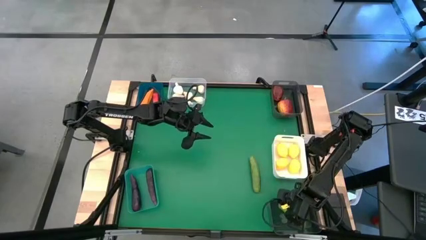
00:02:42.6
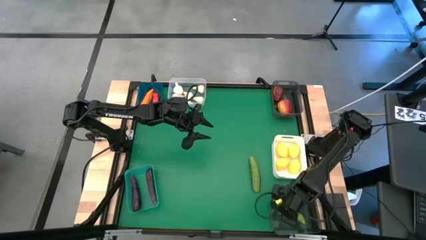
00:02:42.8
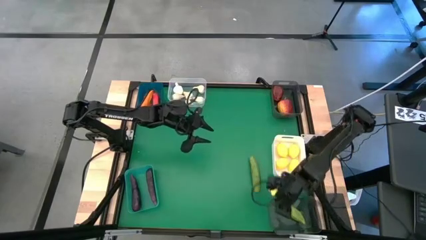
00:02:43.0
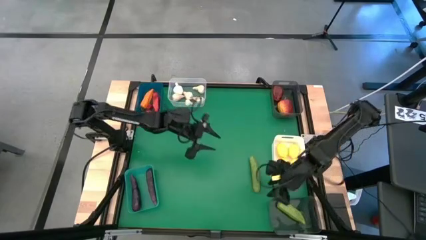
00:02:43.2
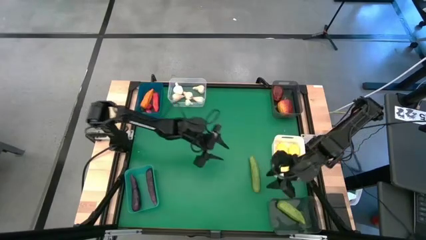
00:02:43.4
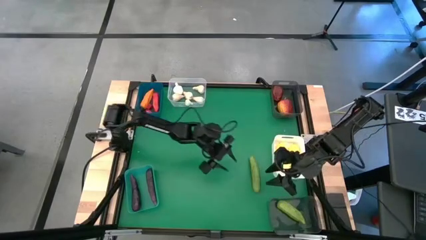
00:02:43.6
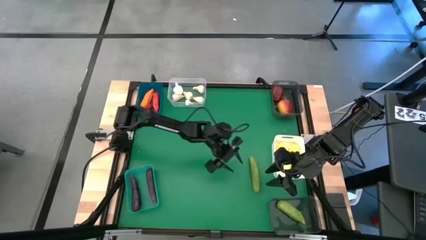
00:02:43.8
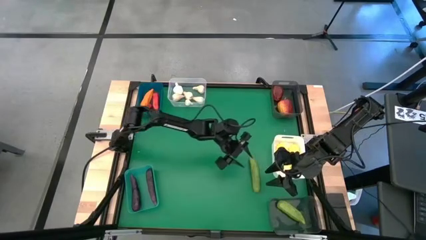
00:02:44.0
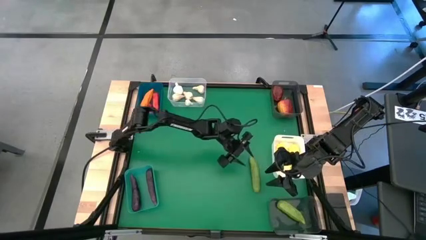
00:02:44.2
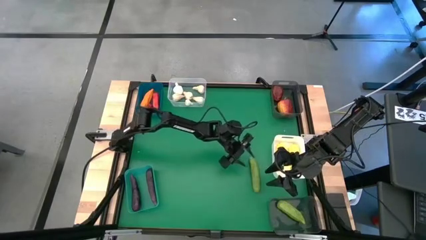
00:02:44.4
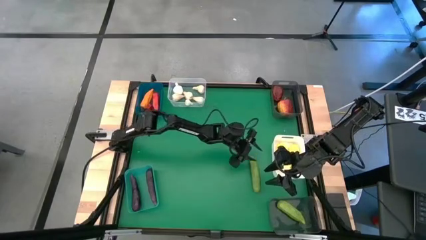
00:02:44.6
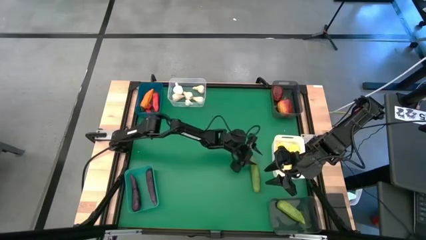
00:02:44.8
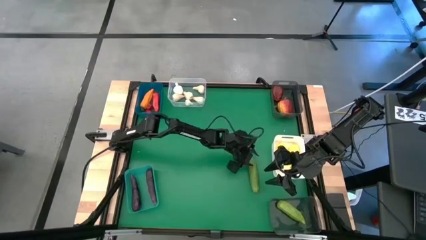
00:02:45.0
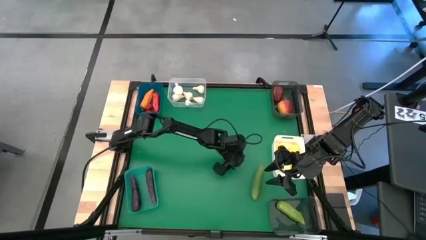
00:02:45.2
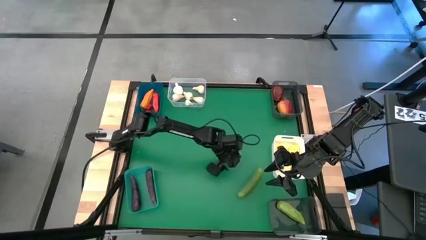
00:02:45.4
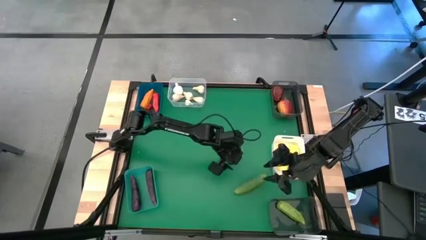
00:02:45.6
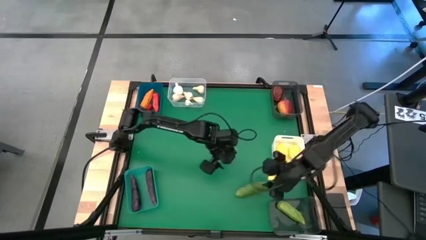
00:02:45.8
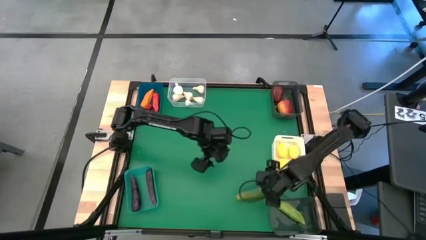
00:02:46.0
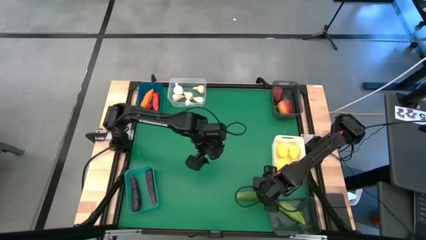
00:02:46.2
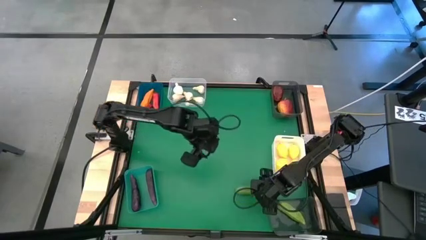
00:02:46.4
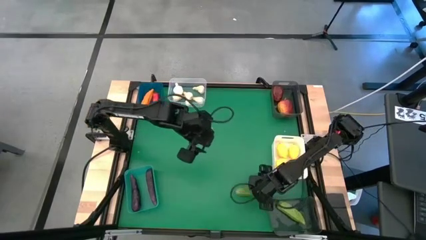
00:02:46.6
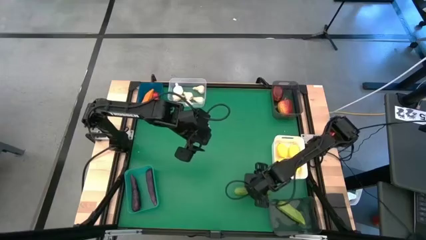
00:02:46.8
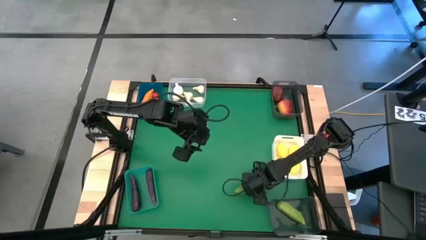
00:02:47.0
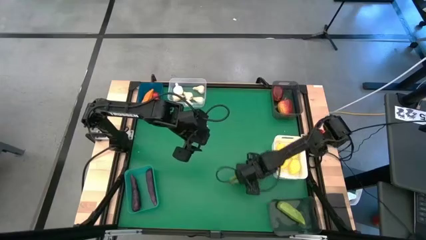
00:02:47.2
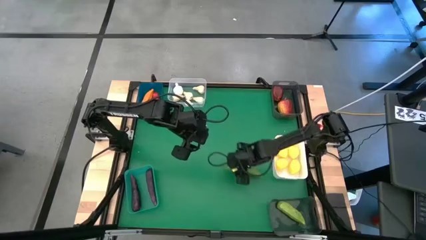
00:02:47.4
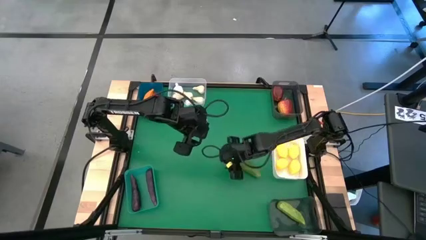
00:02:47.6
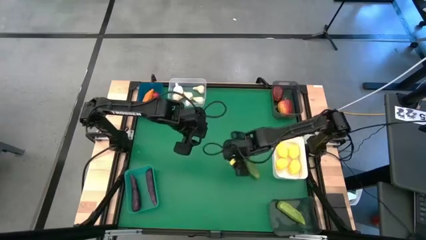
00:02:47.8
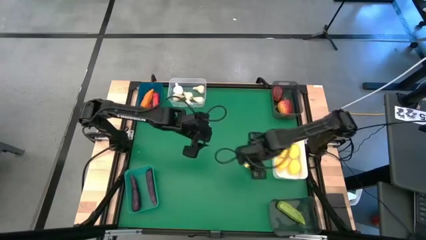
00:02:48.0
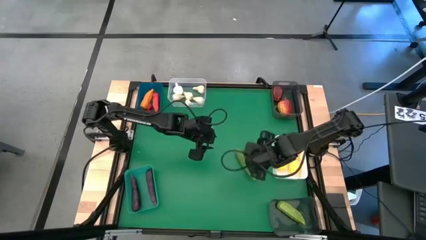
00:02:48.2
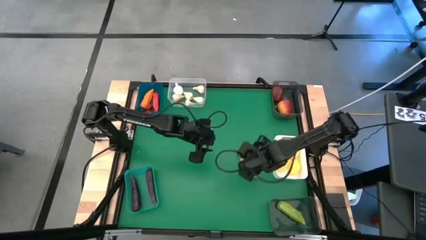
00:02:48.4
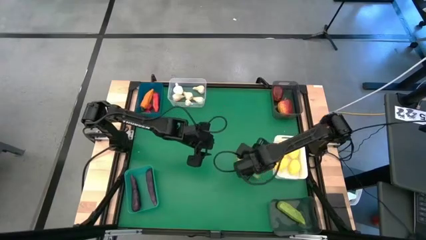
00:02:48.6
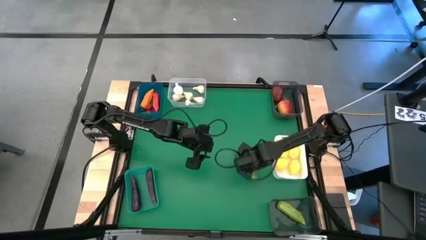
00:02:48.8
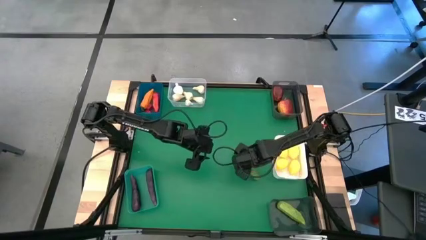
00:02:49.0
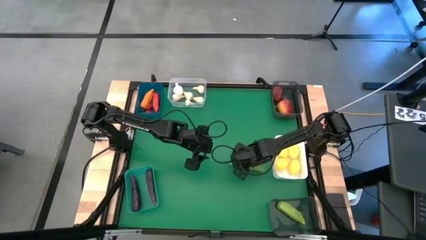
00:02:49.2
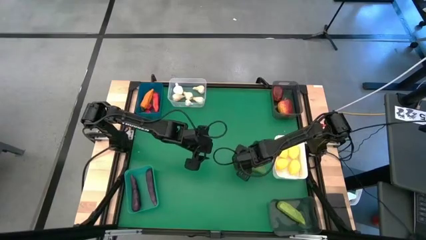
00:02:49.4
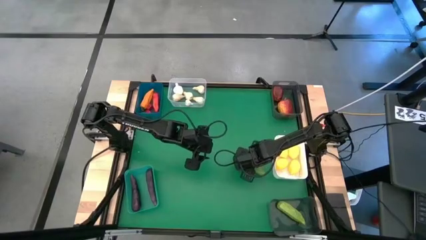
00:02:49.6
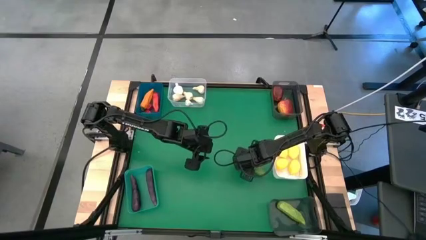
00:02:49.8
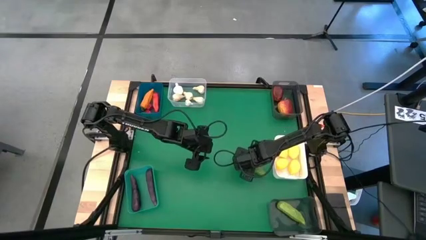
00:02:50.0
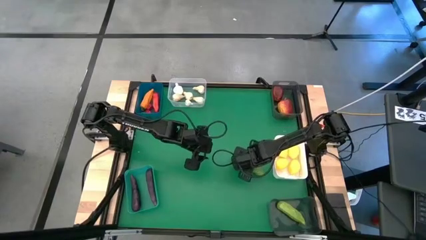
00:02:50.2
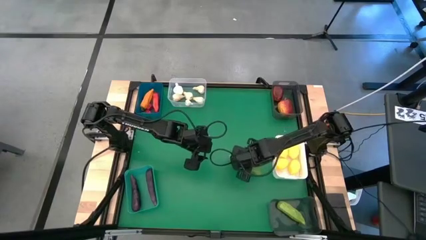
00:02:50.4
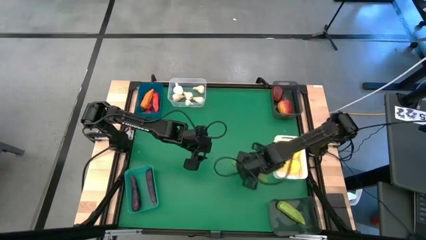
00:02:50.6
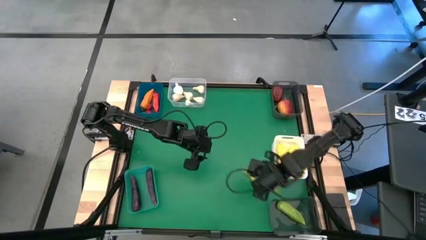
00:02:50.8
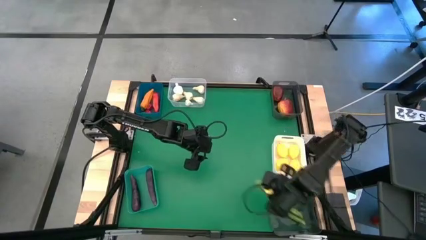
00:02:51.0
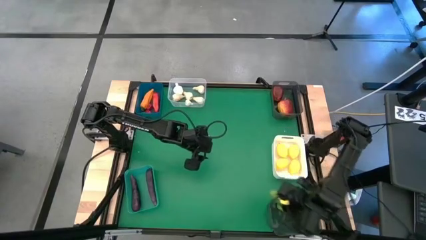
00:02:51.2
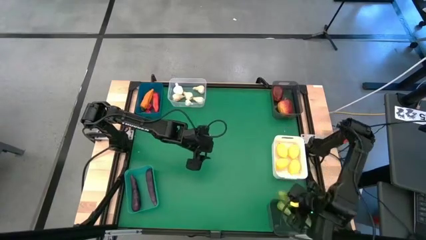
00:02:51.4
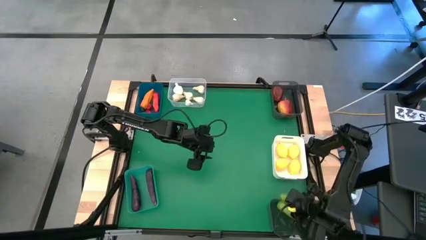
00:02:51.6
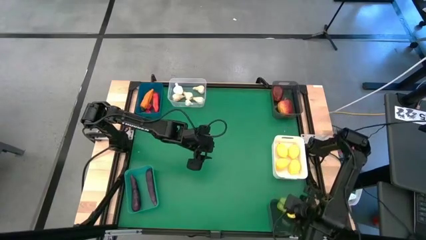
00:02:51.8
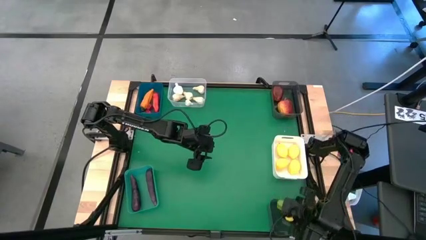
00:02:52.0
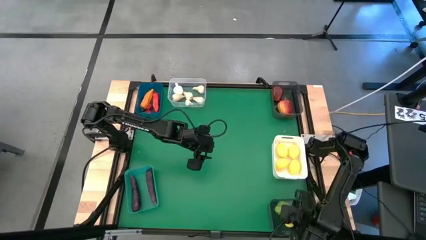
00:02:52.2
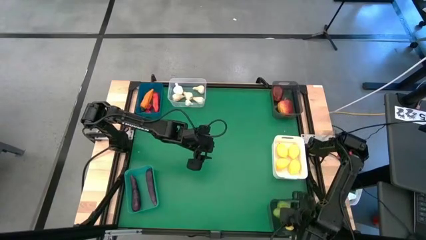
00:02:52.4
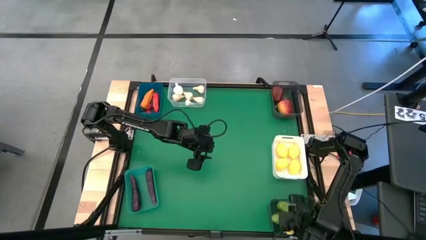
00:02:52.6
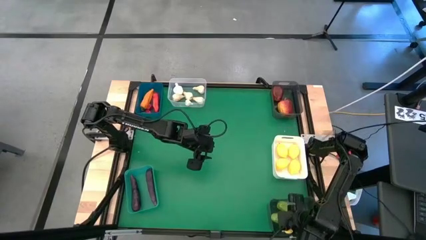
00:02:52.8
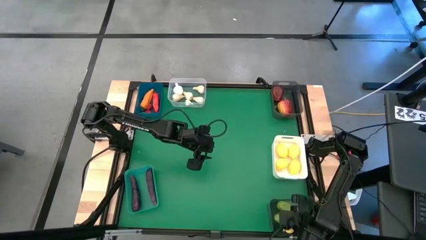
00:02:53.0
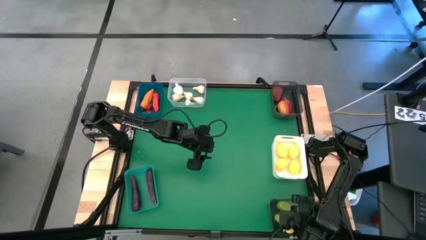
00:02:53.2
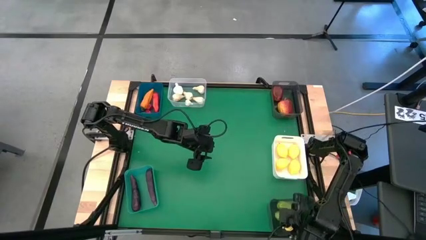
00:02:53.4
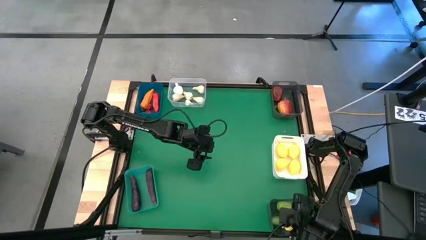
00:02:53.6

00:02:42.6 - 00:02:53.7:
Task: Sort produce into baskets
Put the green cucumber into the bottom black bin

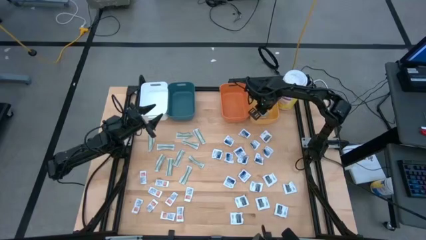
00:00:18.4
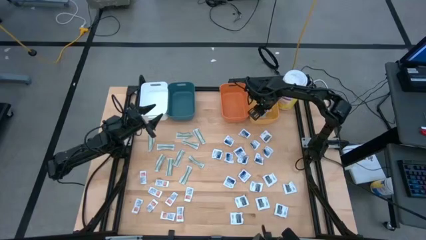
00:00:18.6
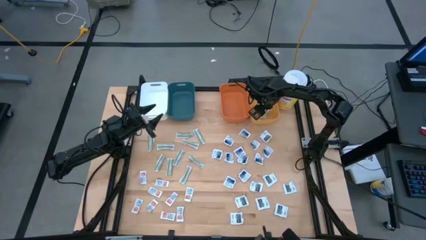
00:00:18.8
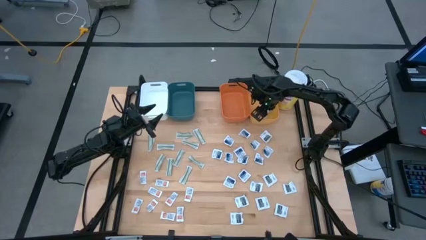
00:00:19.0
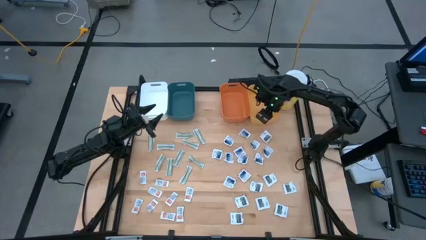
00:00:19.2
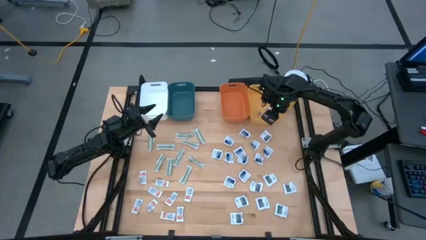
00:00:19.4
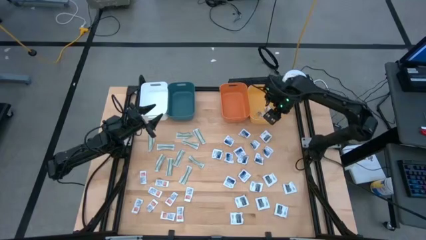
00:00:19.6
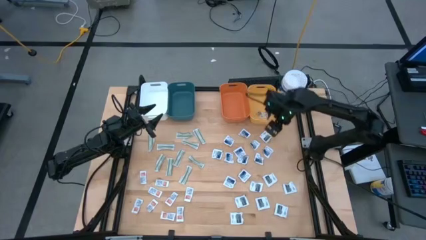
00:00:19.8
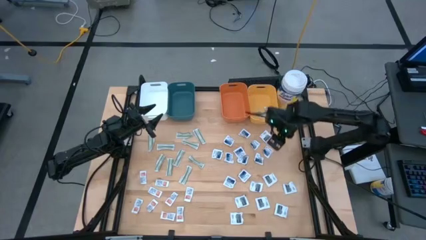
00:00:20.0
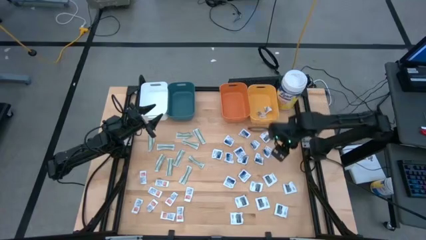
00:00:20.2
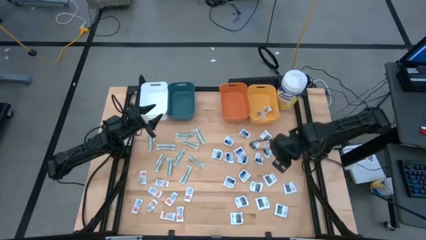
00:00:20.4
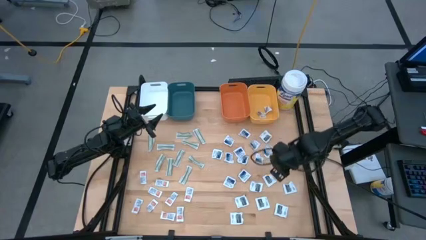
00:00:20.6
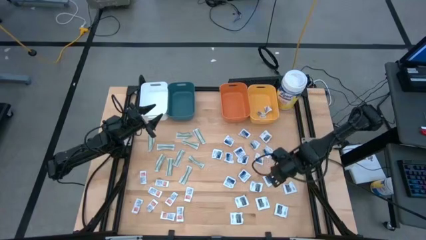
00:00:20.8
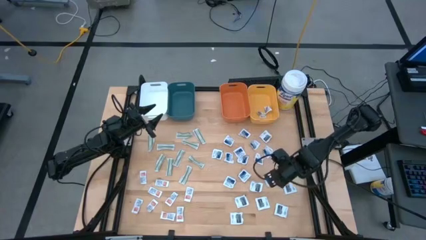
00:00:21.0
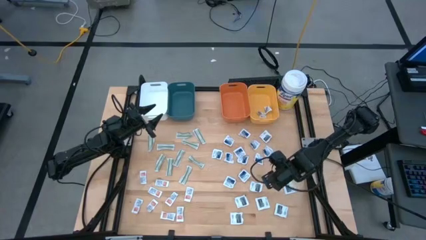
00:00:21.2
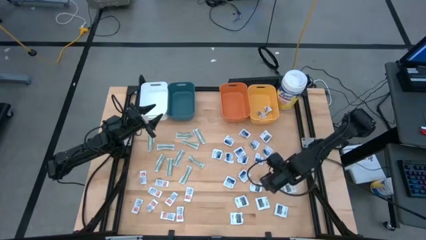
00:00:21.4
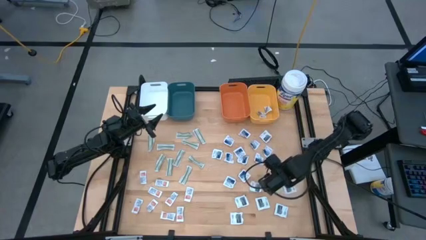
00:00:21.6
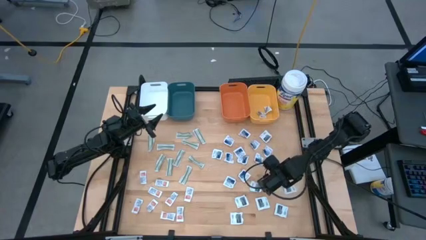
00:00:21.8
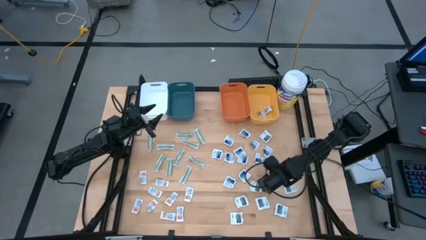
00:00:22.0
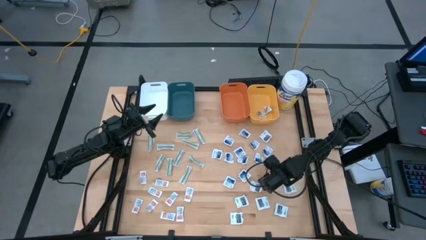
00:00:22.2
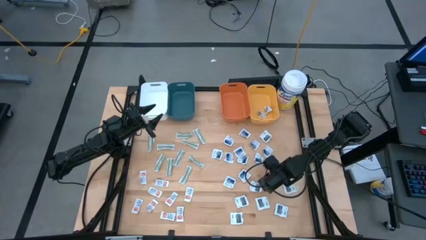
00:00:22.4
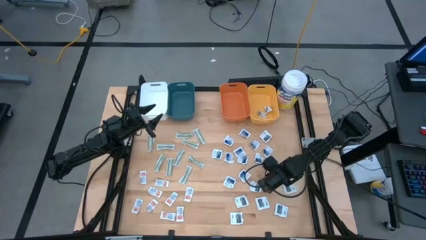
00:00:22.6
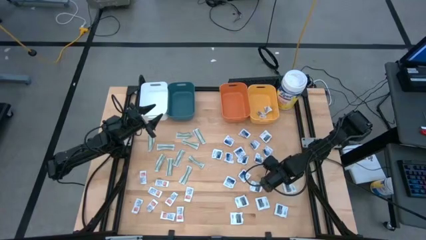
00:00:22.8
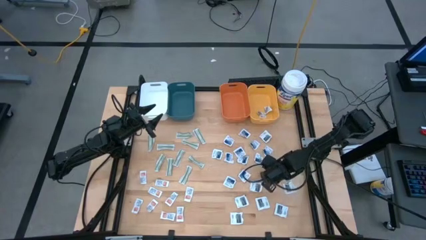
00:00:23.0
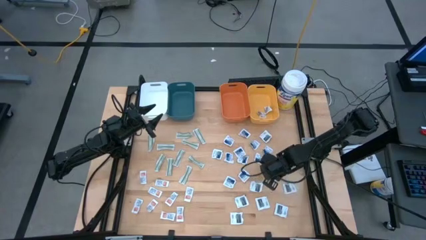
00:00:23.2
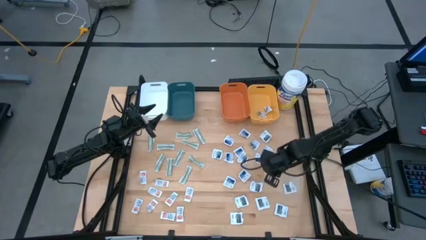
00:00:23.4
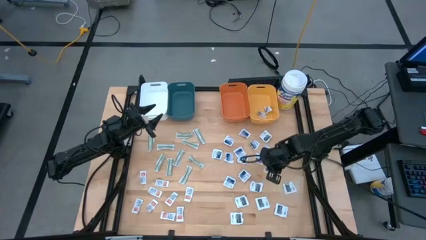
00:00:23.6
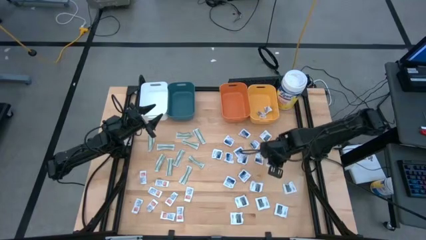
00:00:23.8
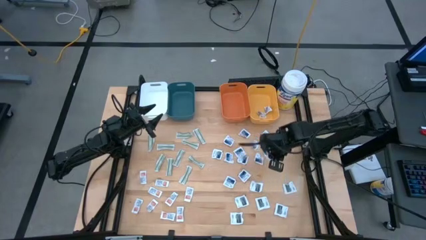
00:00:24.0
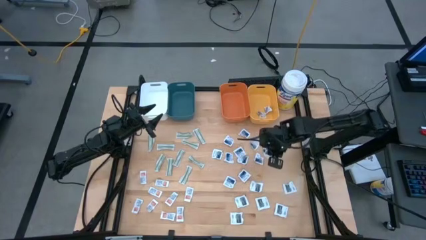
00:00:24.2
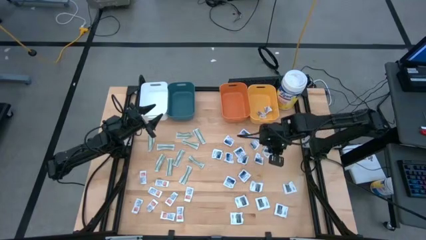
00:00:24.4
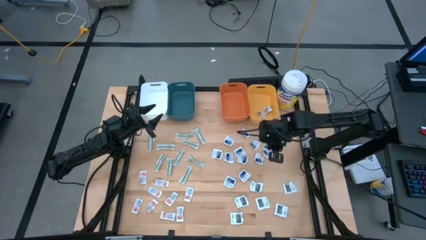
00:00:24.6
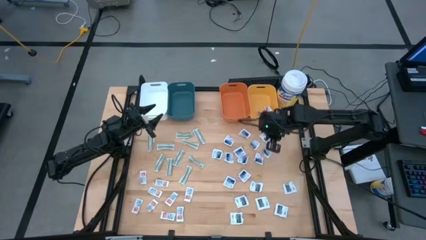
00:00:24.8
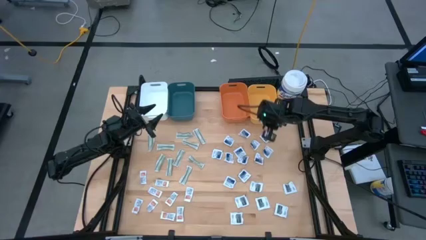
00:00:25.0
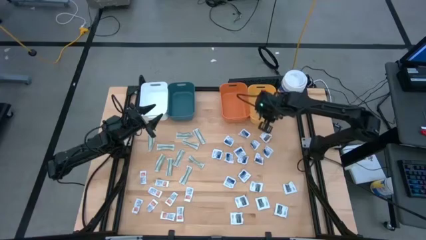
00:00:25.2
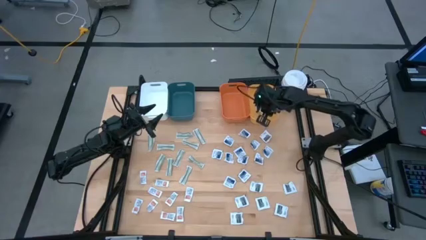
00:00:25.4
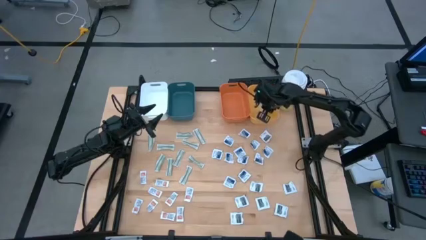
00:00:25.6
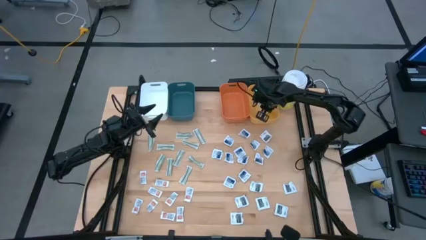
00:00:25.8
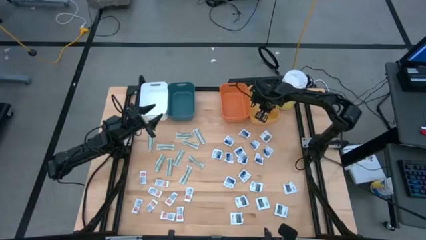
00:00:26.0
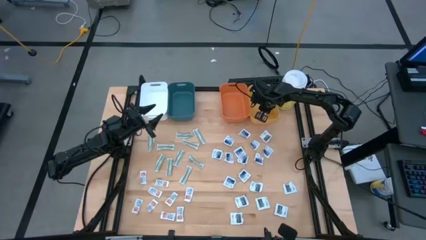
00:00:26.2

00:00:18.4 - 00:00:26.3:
Task: Pick & Place First Aid Supplies
Put the towelette pack into the yellow bin
